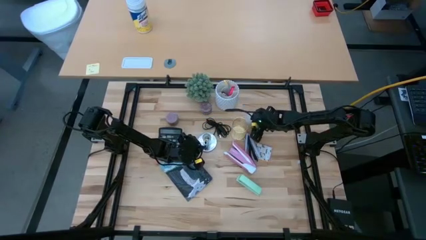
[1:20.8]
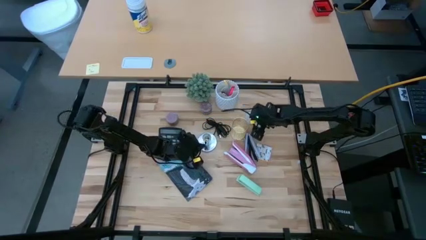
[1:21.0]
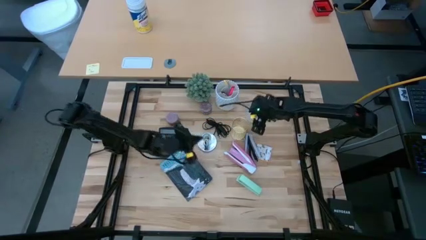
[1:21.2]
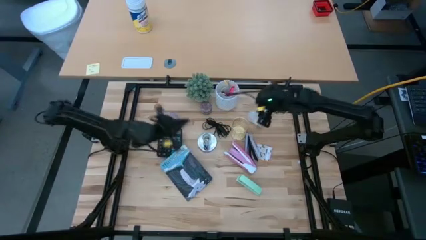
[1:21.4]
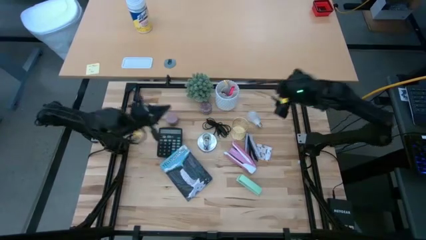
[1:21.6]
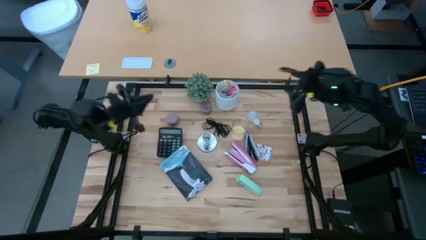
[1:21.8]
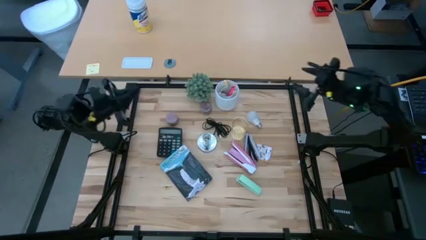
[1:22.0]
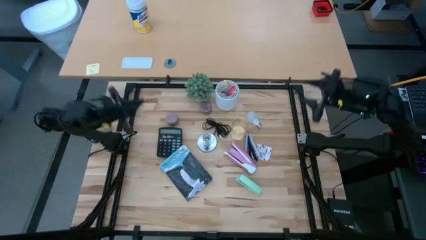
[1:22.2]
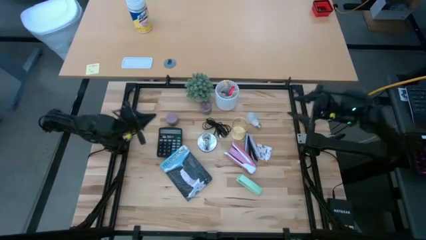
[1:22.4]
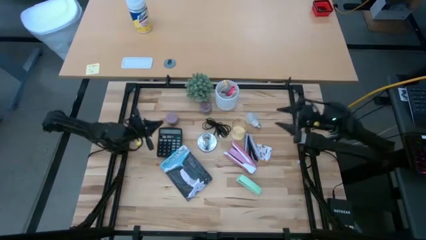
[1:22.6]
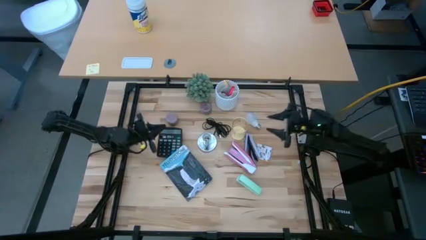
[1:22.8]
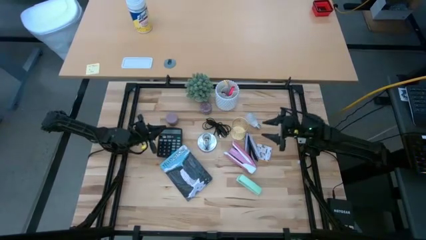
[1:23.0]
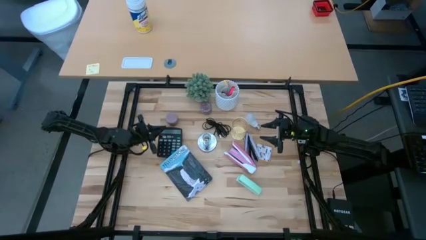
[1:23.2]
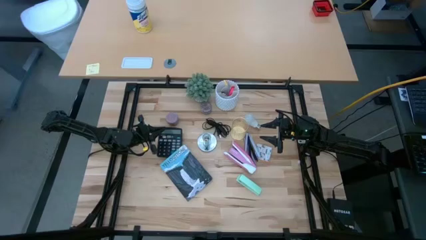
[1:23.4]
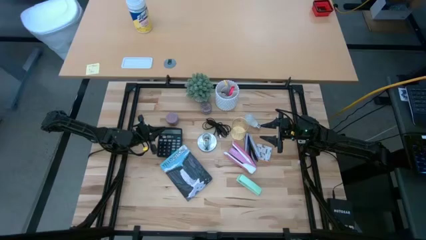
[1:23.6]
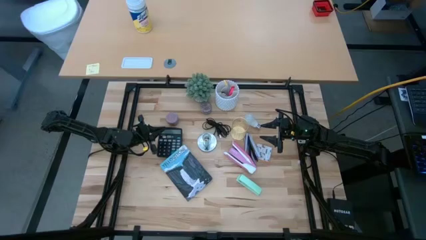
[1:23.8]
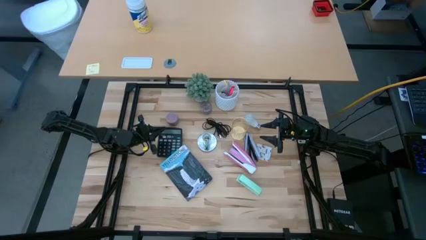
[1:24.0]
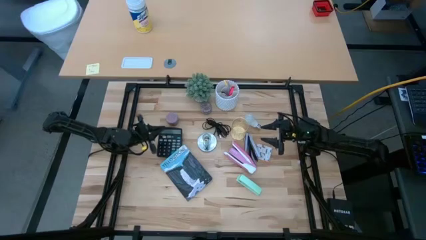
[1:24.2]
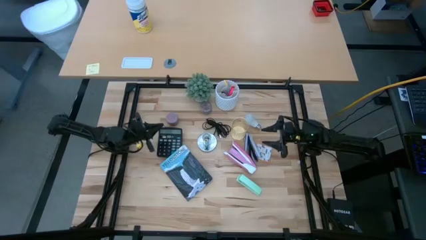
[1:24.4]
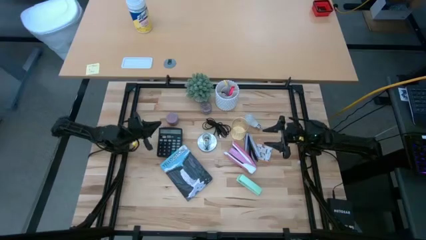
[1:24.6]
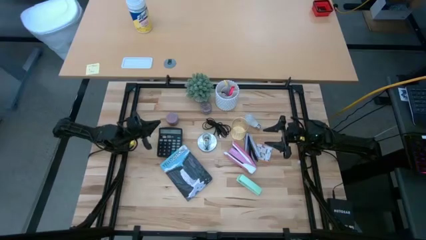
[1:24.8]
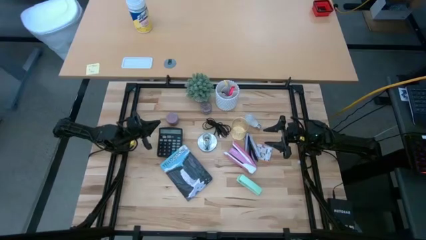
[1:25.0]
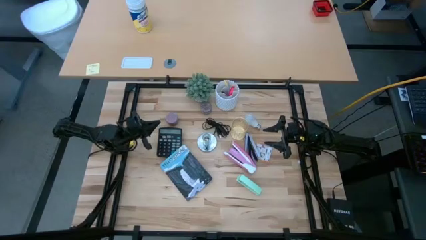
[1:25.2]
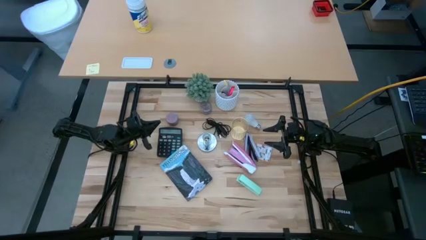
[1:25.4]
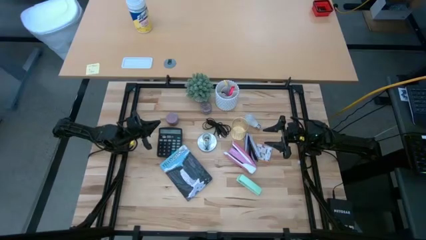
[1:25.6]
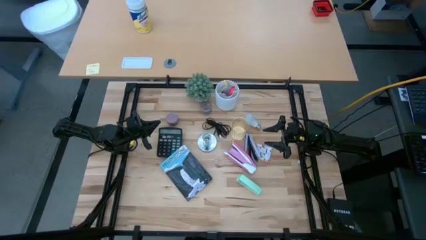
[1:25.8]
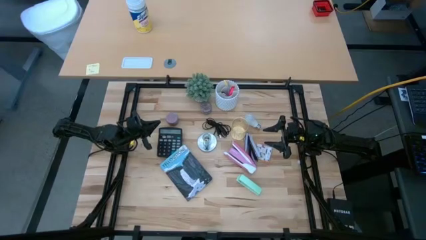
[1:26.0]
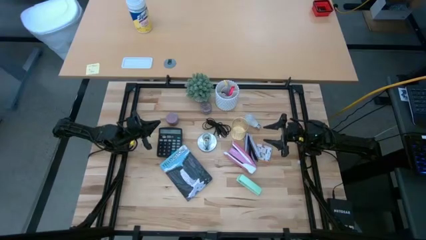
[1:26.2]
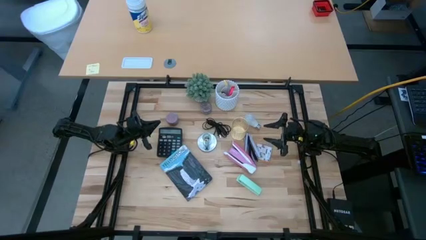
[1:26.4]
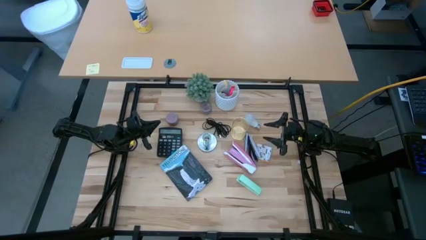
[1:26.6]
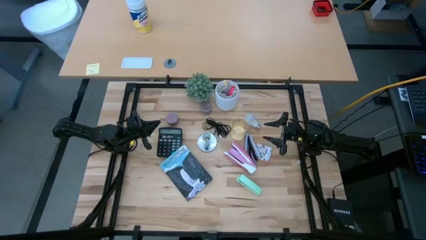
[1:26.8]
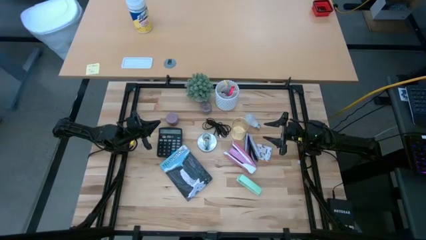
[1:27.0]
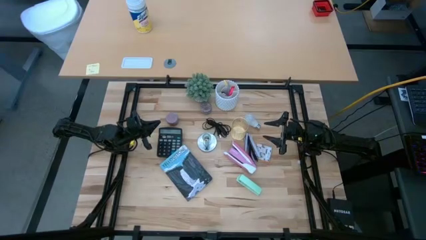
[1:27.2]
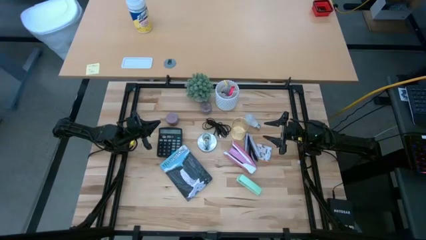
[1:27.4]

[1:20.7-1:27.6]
Task: Screw lightbulb
Return to Home Position

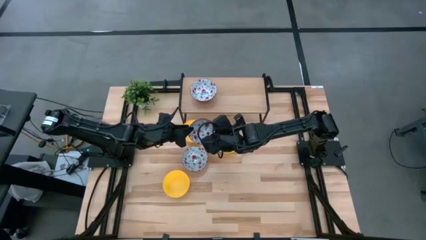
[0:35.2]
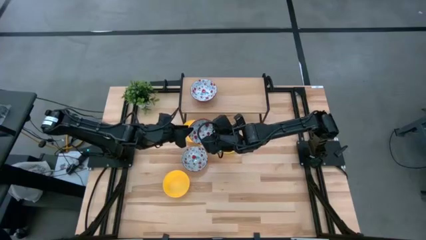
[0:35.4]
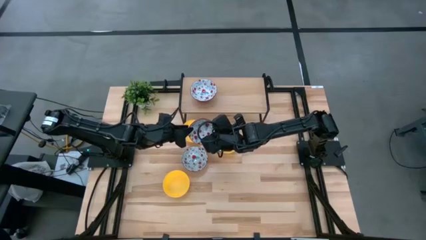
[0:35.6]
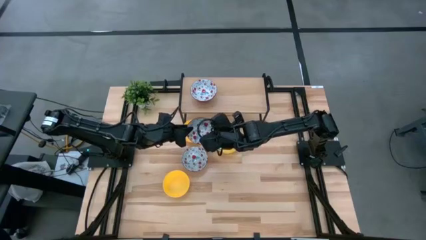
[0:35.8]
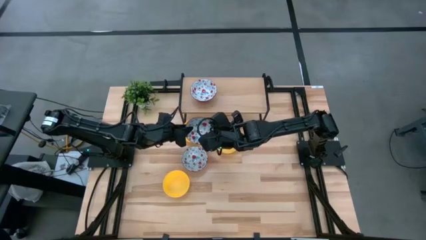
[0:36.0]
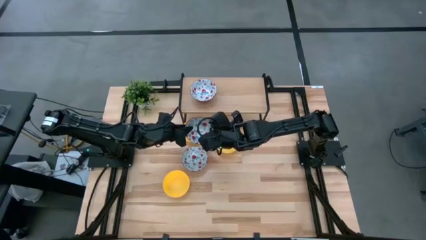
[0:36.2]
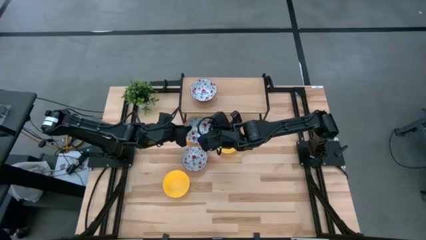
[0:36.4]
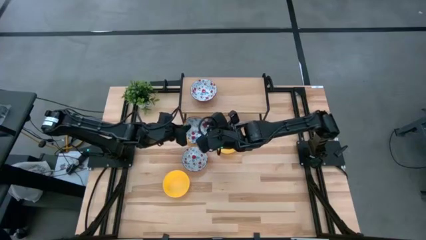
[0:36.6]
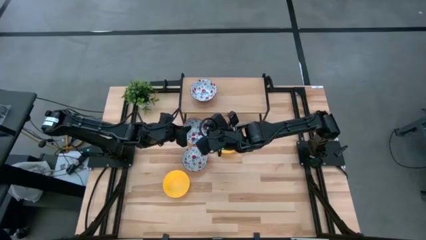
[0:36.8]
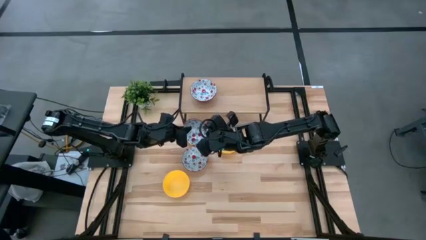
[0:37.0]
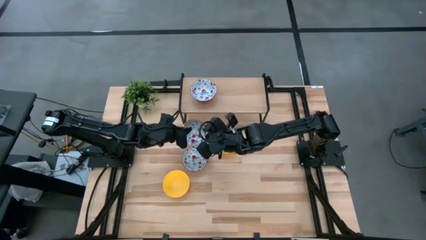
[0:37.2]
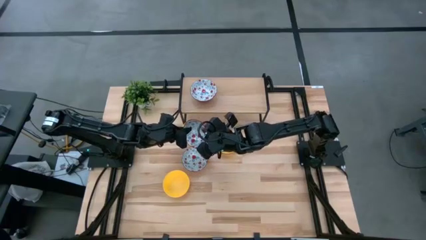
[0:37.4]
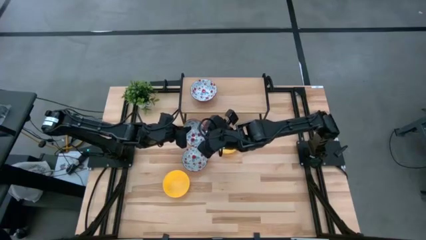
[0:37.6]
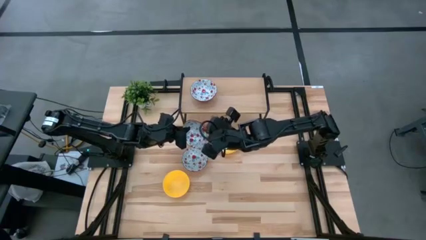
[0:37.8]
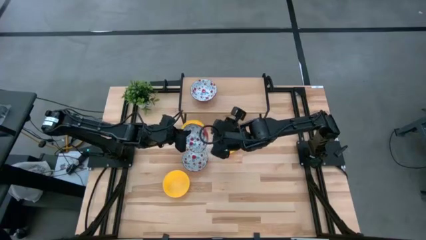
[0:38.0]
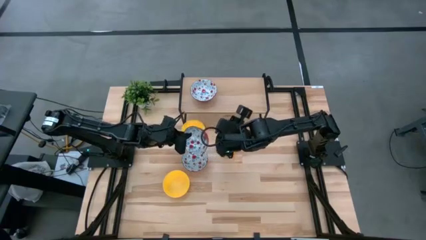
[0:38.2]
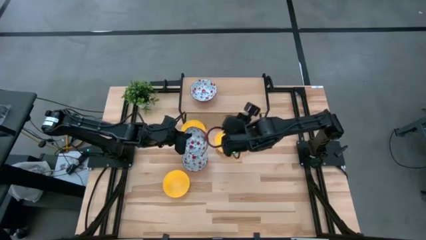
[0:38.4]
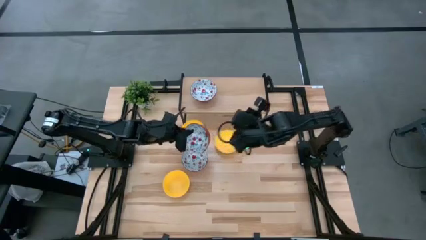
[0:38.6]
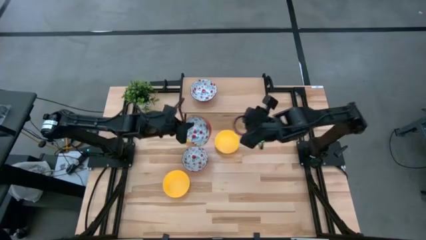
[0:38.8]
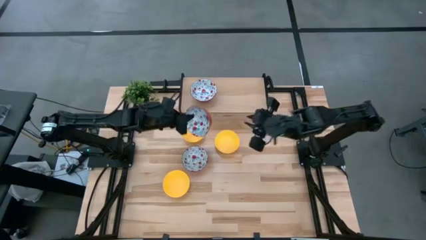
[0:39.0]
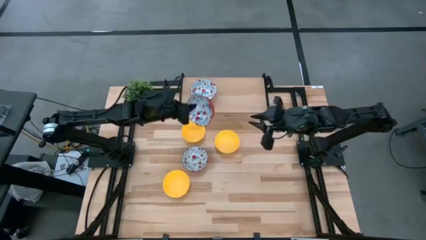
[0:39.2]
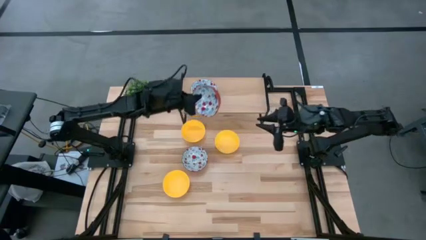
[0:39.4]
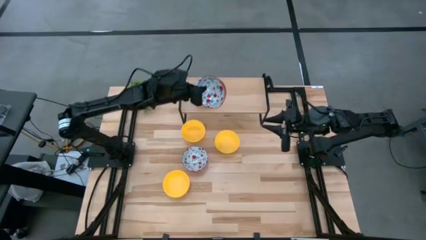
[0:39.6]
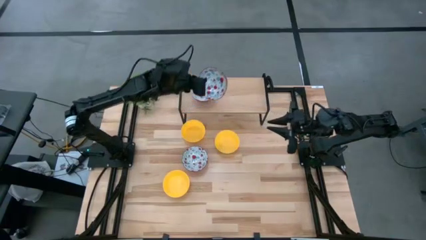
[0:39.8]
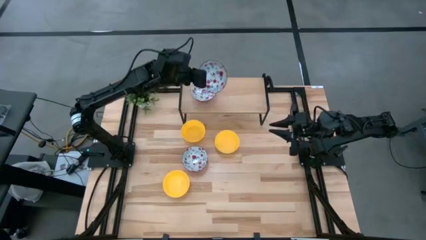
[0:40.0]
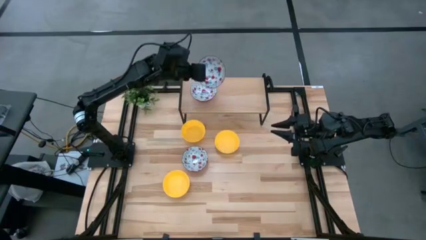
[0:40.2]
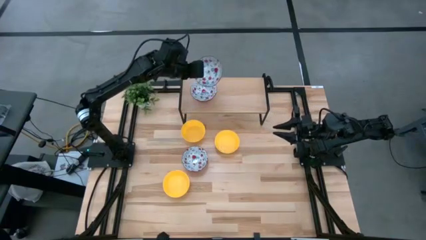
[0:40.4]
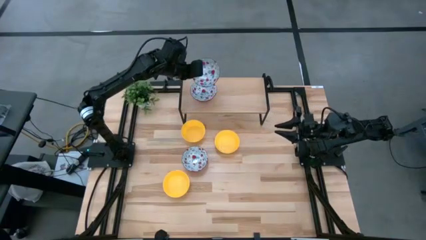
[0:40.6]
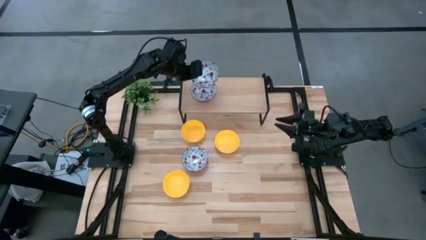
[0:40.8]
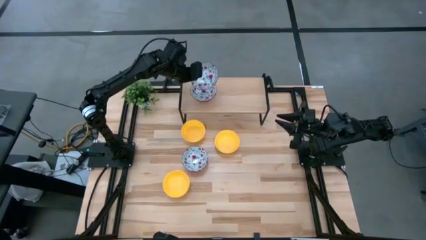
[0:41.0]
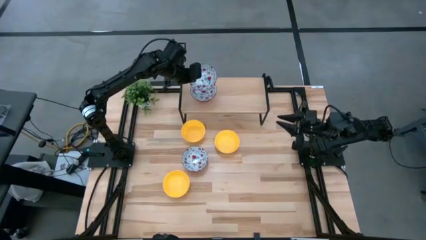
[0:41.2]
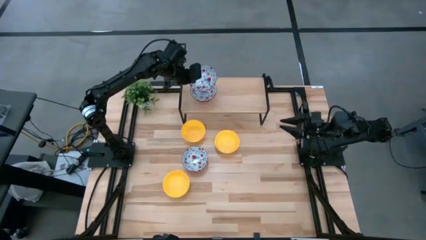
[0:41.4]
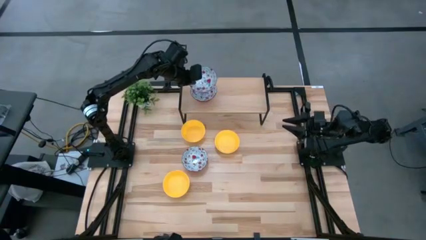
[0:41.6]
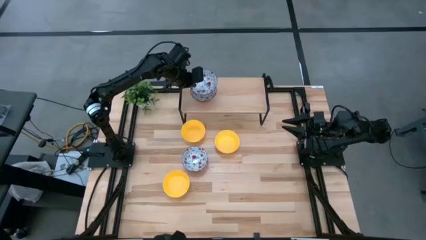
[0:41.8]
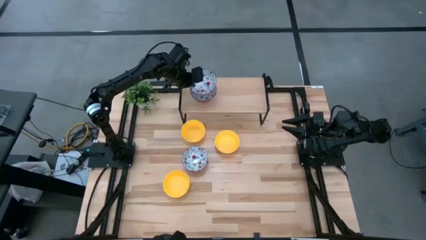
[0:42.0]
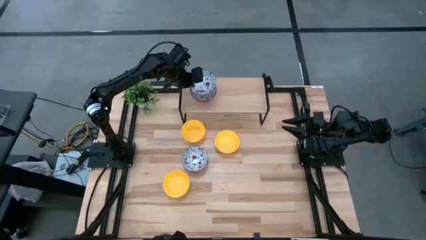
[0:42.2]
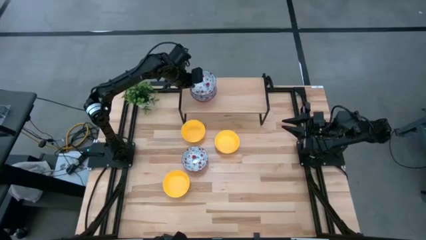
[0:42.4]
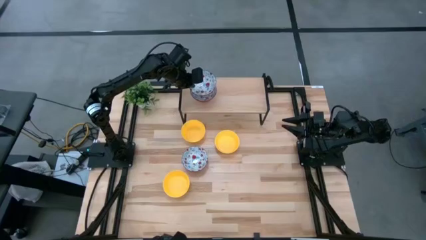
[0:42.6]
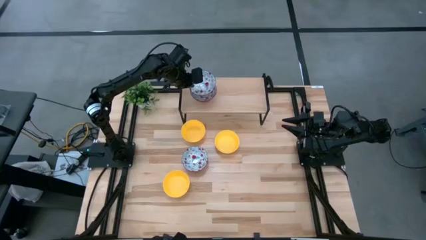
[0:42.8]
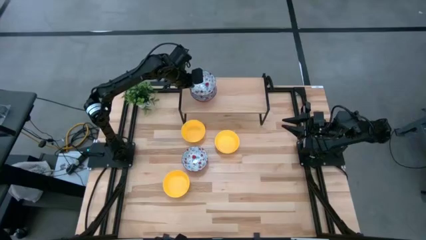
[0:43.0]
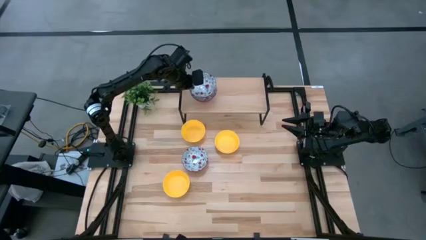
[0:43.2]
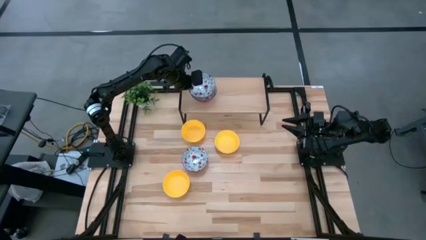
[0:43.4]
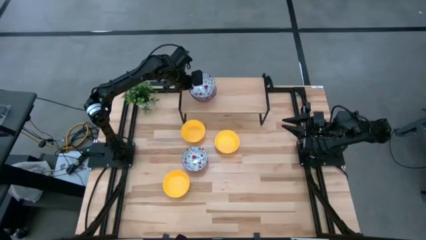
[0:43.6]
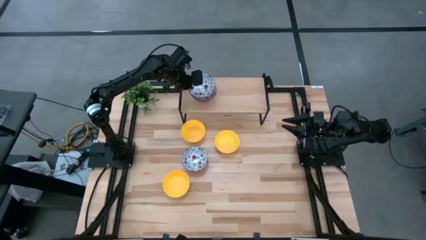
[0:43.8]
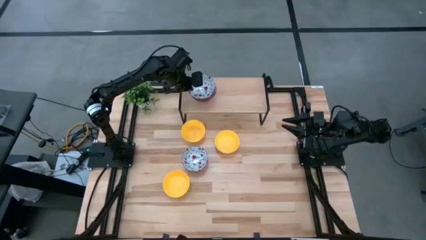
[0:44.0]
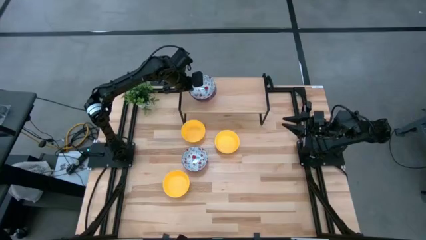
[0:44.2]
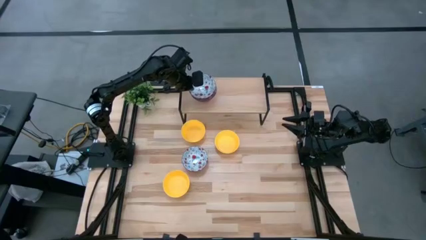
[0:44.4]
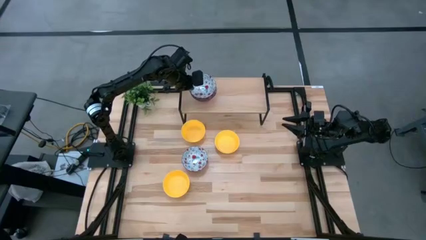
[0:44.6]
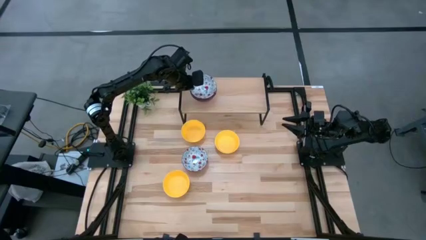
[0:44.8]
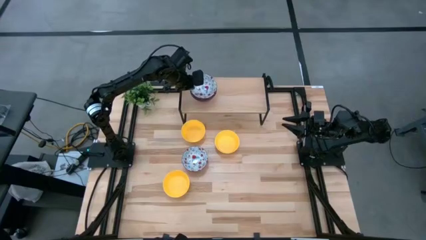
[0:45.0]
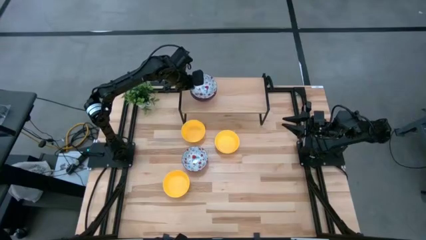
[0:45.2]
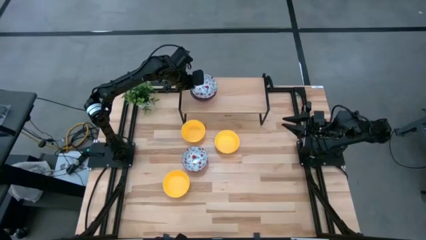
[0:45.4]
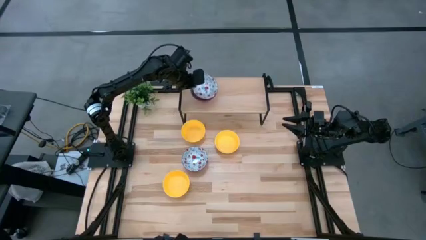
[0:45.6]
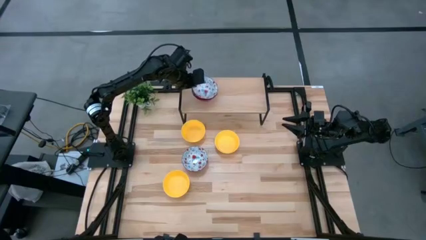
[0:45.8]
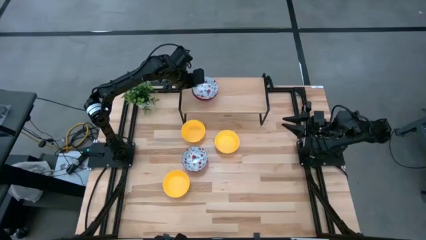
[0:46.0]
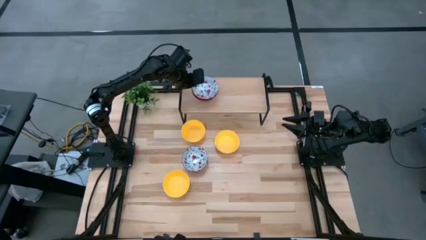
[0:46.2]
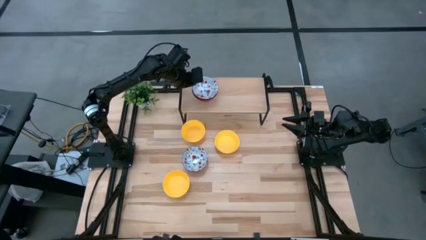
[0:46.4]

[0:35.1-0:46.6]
Task: Pick & Place Mini bowls
Stack the bottom white patterned bowl on top of the white patterned bowl on the shelf
